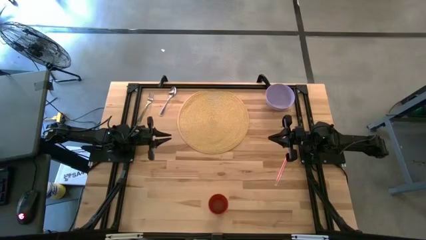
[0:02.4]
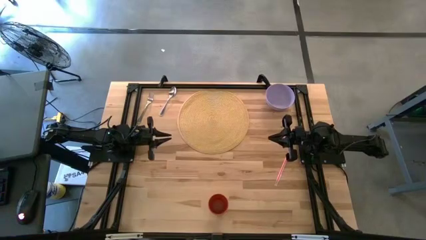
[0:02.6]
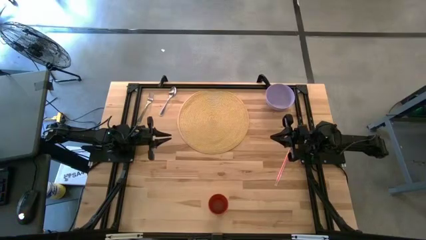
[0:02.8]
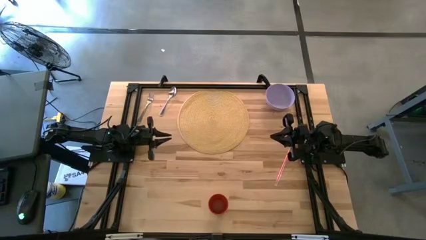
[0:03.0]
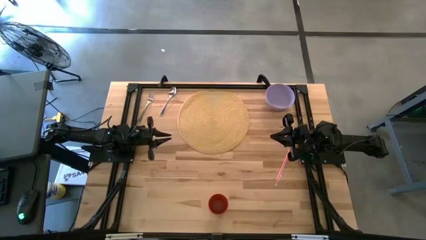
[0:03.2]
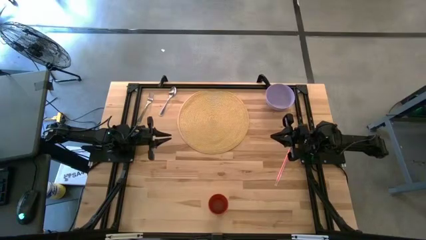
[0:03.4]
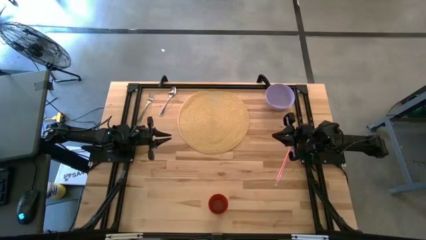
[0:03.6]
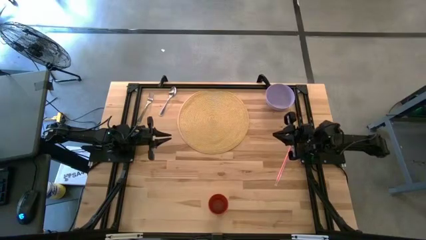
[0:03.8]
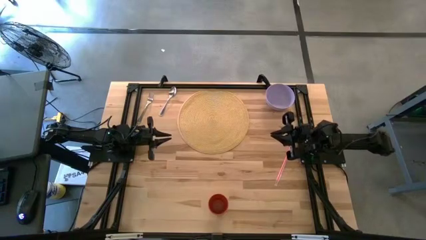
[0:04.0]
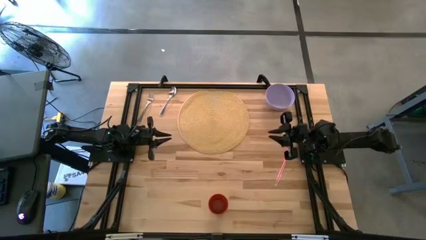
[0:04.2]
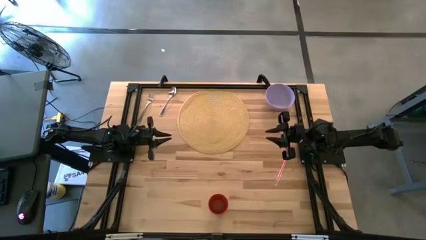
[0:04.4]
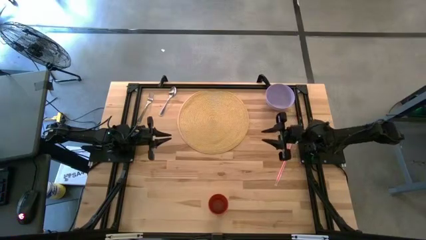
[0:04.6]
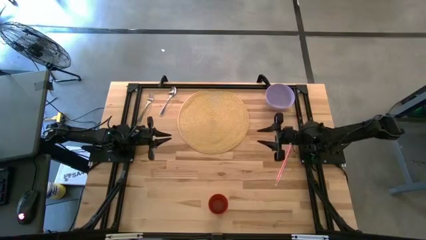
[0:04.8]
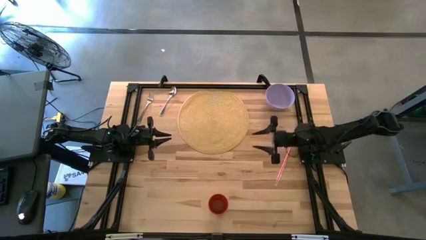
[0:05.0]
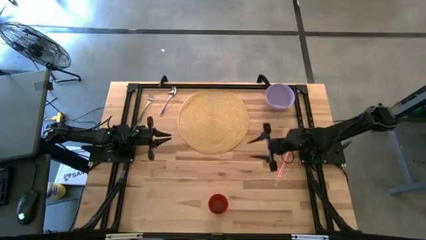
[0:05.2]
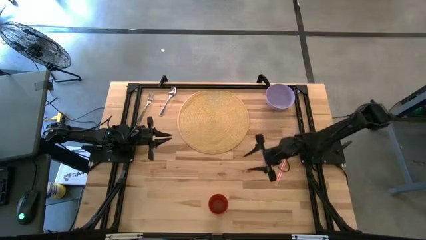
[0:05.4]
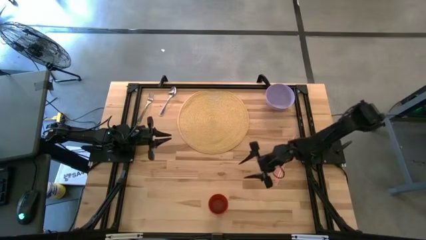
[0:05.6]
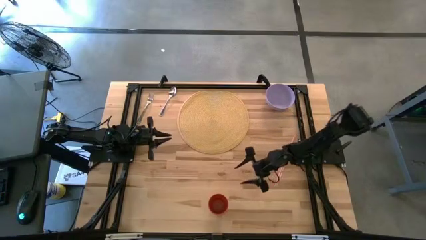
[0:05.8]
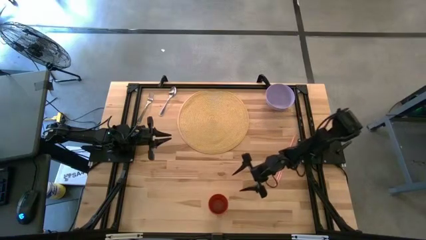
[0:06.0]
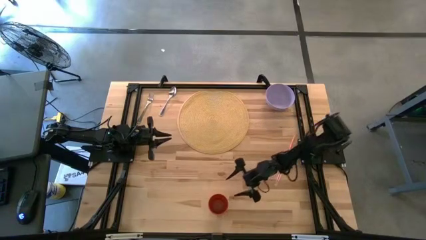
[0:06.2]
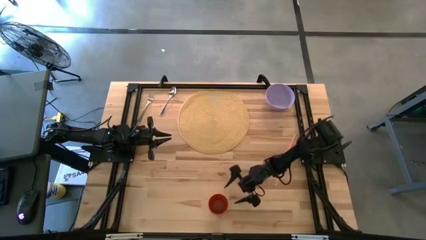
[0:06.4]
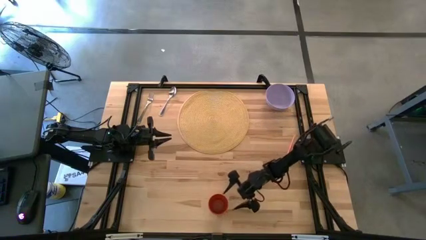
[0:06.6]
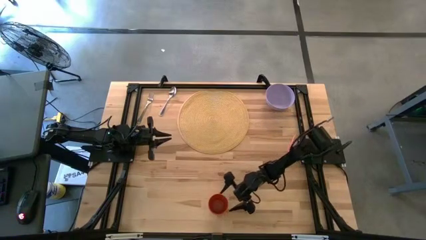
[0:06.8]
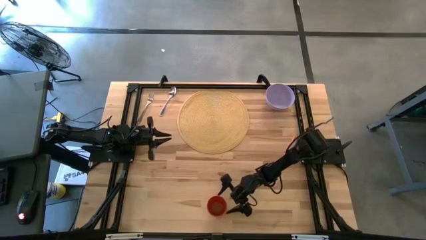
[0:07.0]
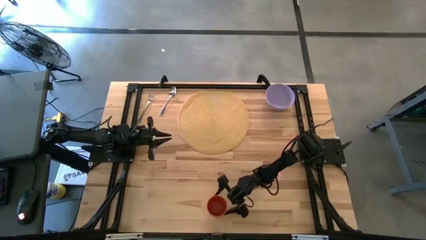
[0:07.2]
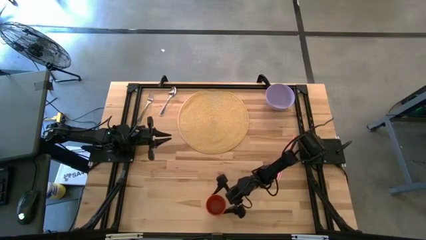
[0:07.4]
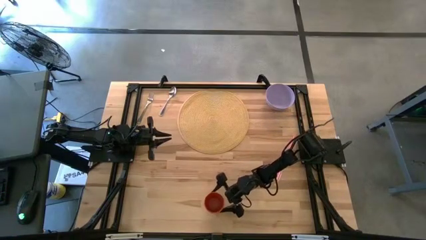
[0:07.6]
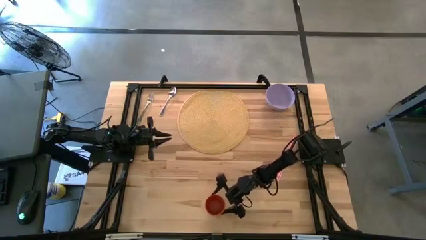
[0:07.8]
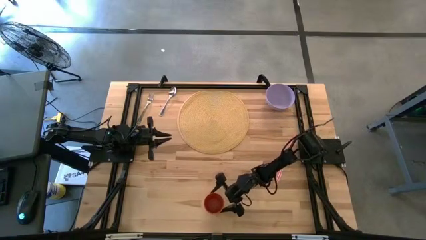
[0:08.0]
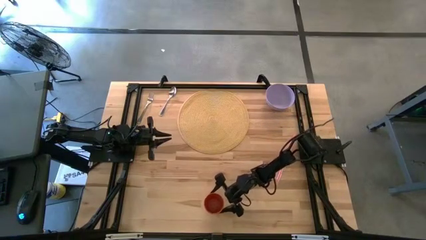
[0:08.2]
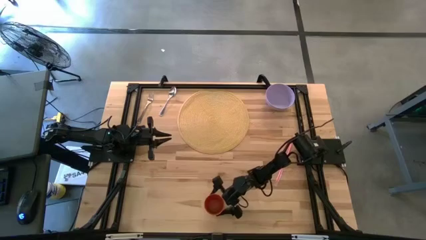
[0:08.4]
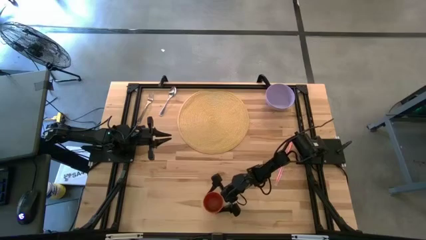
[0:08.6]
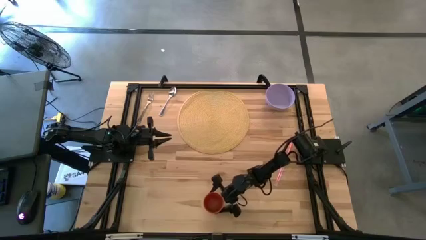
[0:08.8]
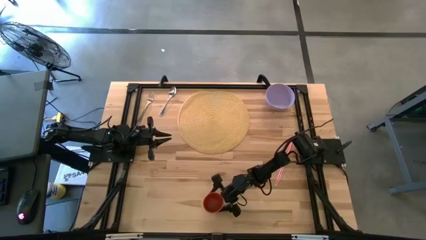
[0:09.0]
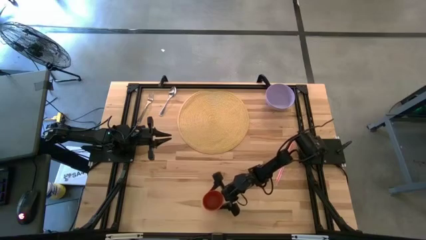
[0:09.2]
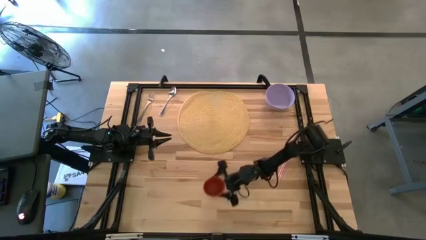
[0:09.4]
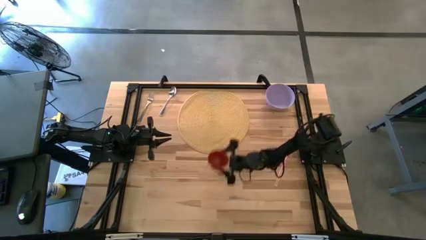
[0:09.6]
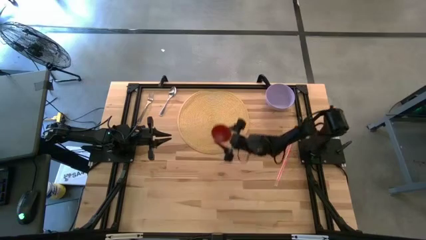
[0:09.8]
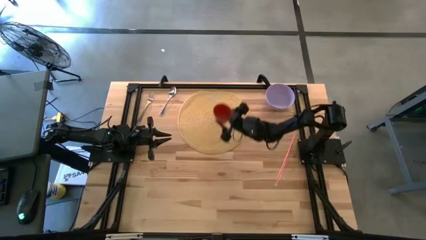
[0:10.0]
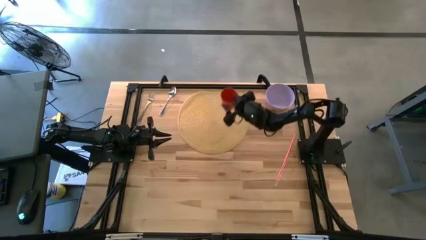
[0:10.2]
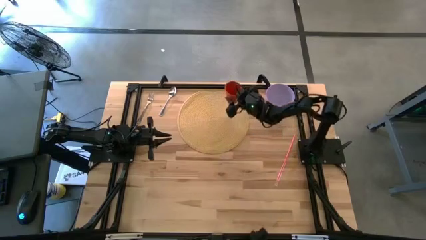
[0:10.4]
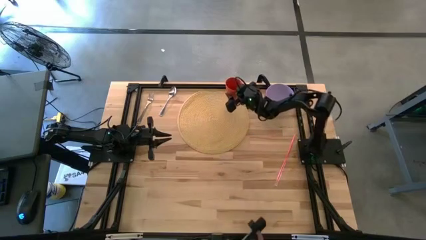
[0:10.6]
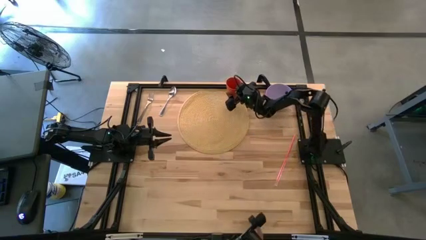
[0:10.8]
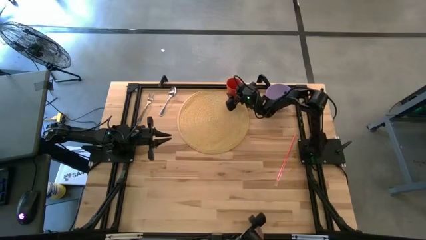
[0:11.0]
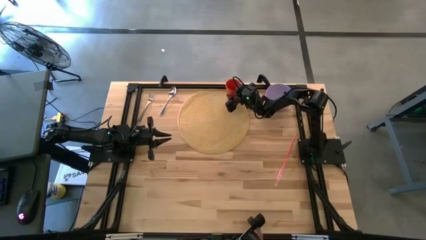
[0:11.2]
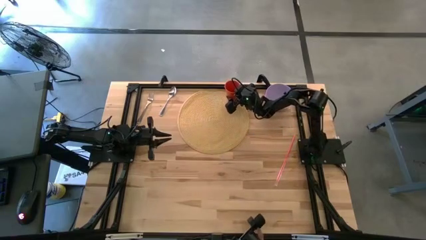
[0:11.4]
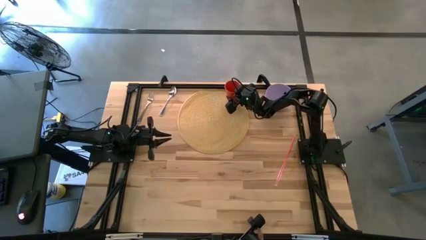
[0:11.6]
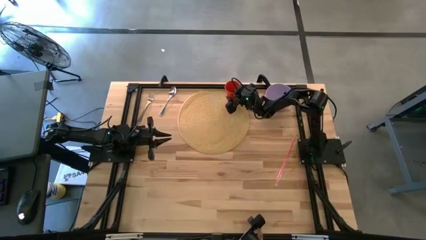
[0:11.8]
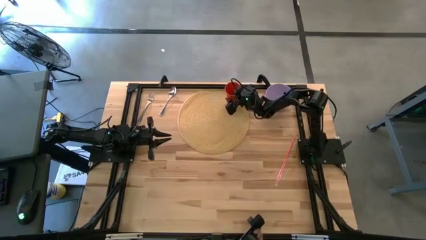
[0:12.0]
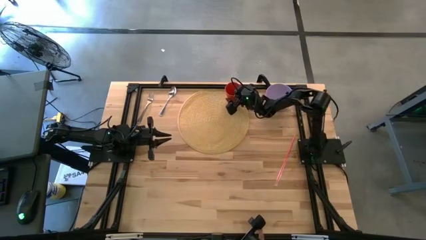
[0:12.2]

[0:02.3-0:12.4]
Task: Pick & Place Utensil
Put the orange cup on the brown mat
